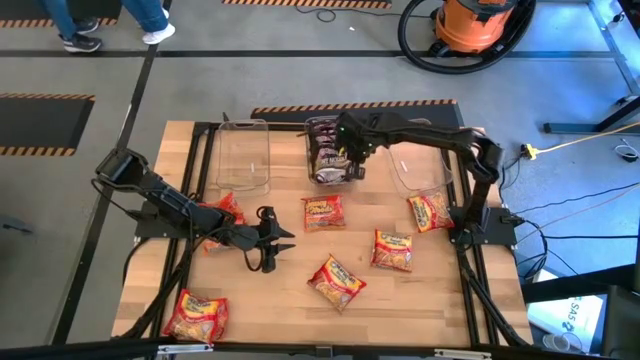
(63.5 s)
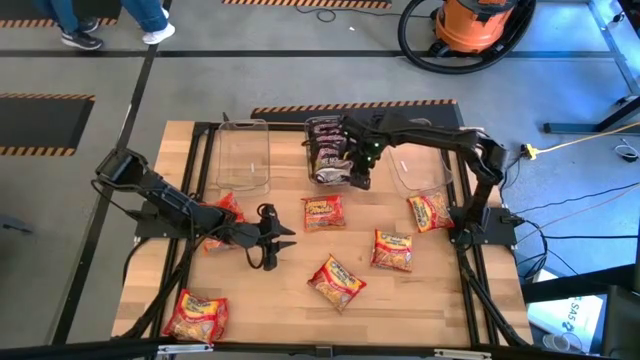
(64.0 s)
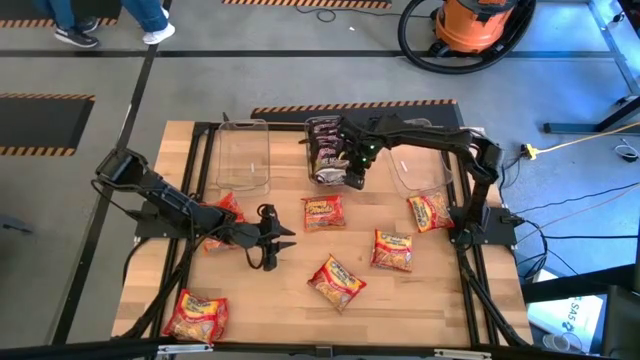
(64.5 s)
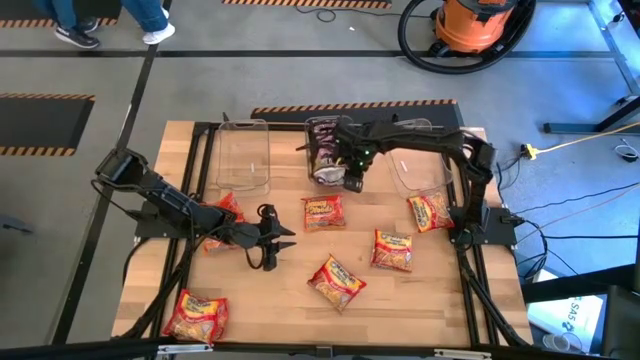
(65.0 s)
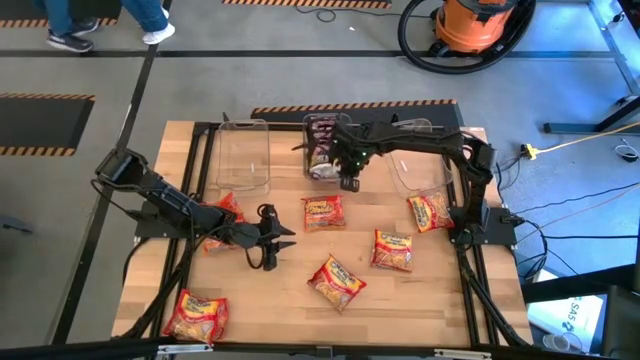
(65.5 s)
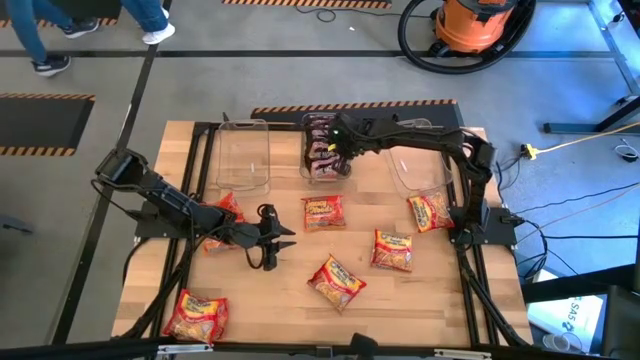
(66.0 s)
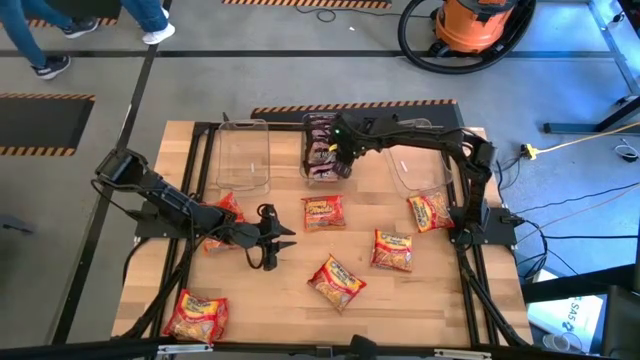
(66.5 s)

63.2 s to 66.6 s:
Task: Sort Maruchan noodles
Put the black noodle pack into the middle transparent bin

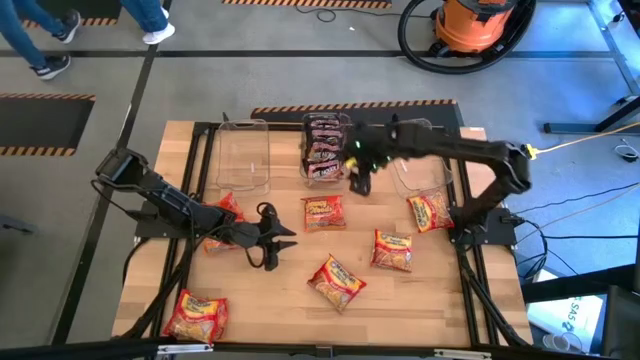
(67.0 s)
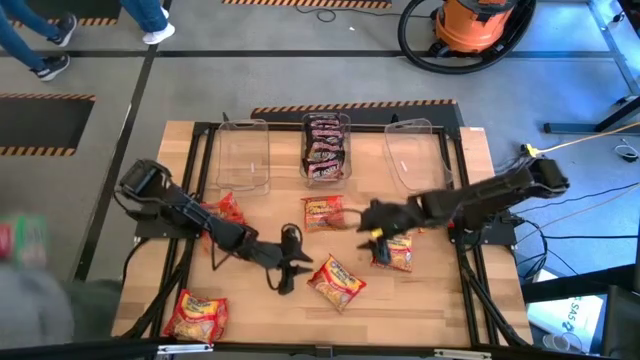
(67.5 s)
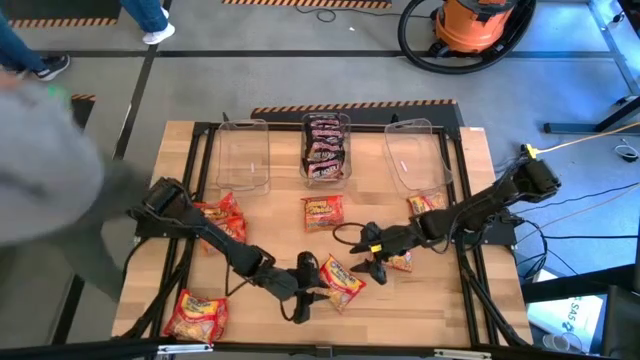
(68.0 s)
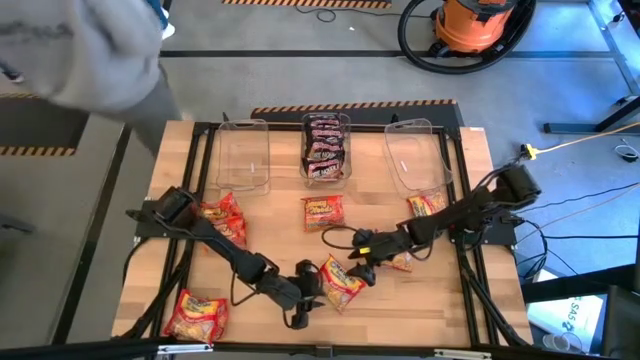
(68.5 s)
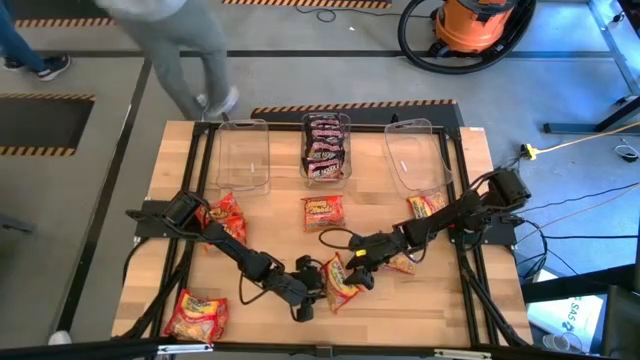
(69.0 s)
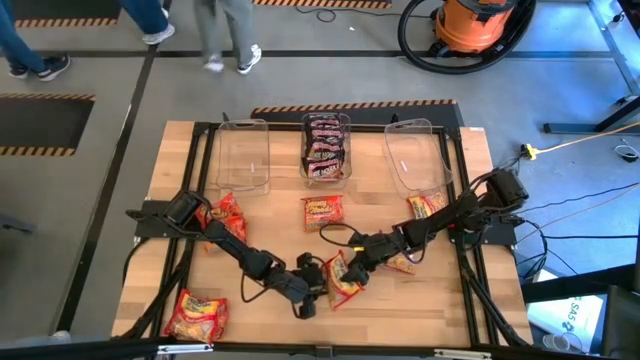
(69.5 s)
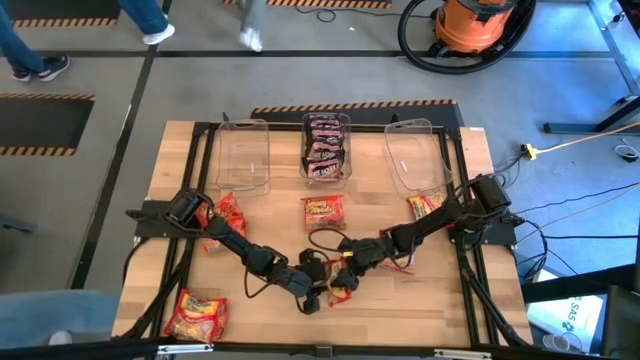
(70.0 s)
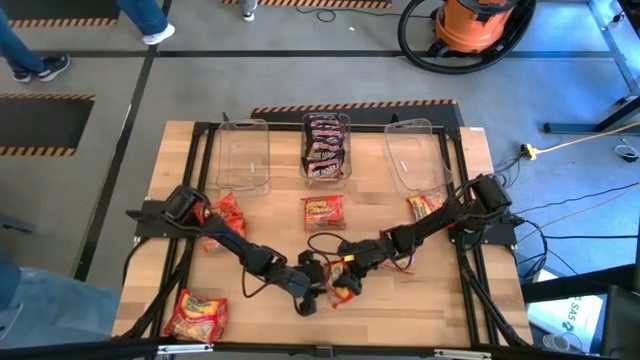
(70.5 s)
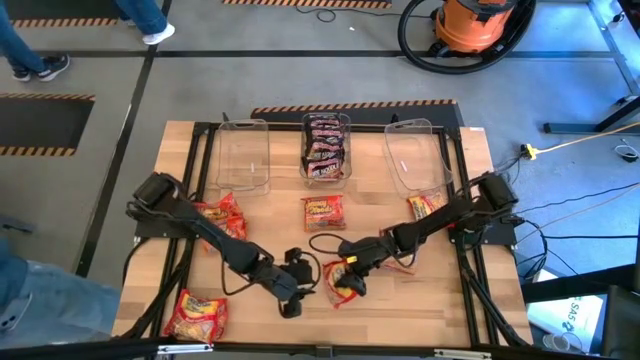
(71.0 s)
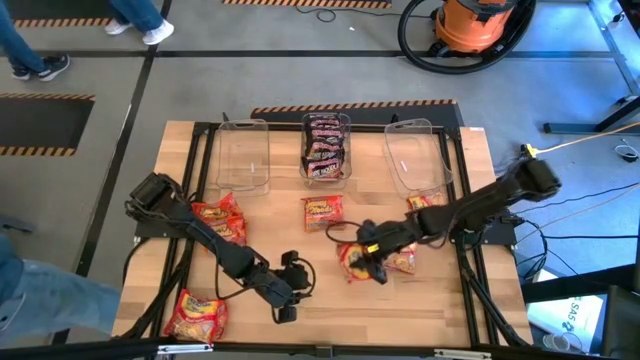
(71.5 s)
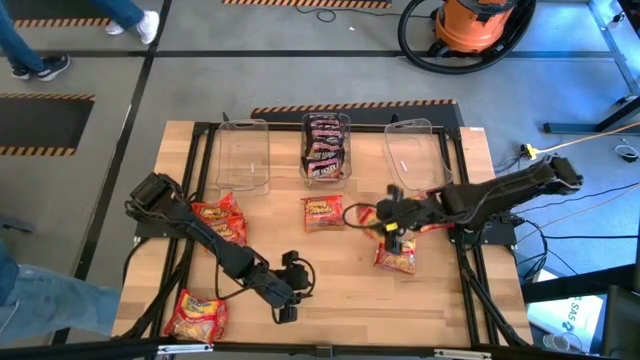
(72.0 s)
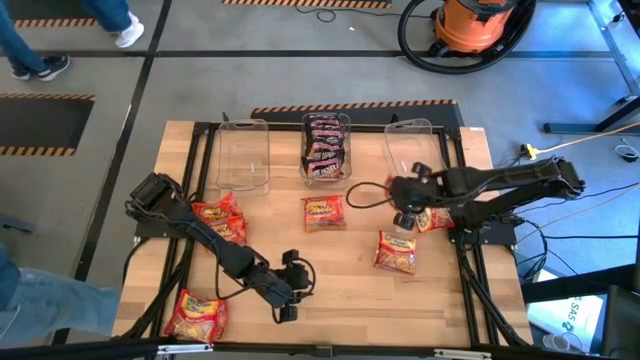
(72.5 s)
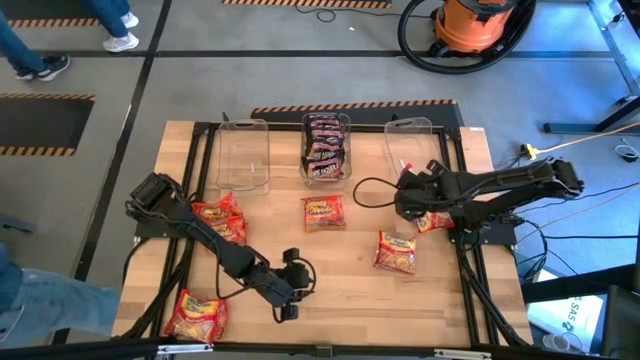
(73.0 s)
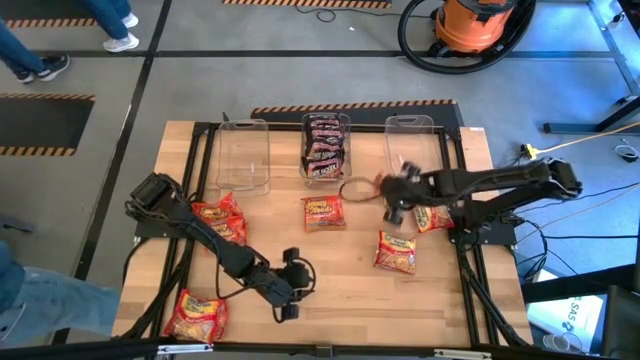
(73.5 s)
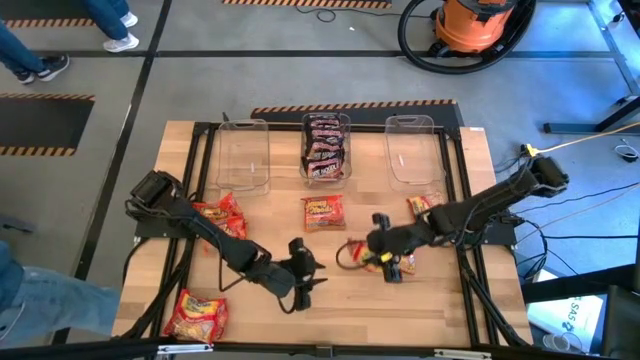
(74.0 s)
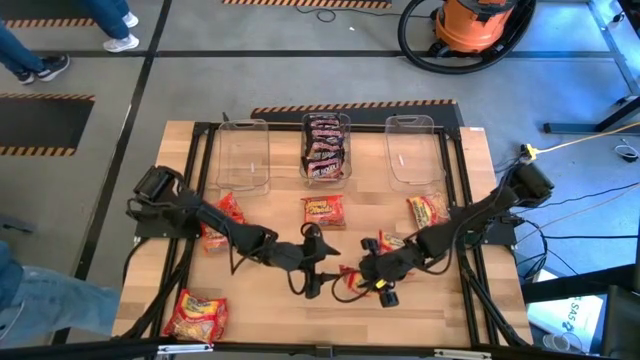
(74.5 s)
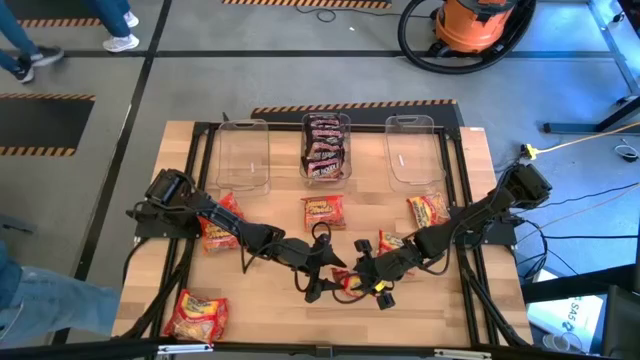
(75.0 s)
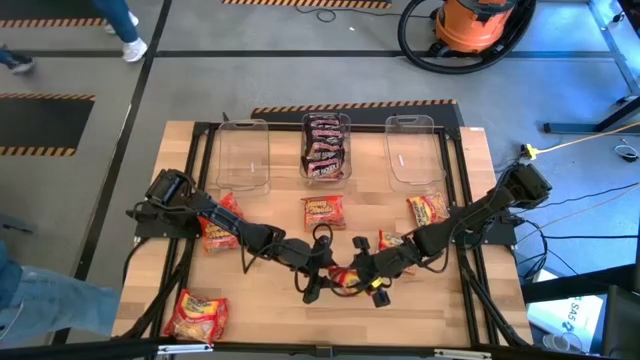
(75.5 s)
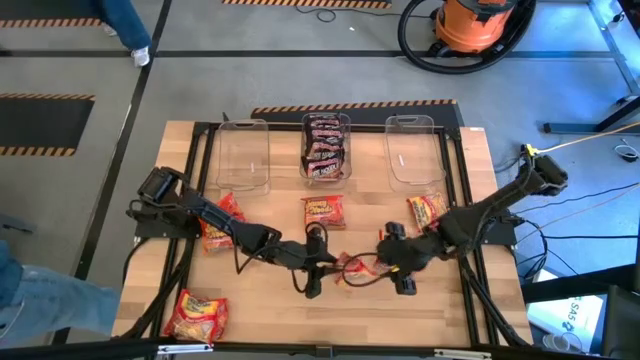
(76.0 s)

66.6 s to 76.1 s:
Put the red noodle pack into the right transparent bin

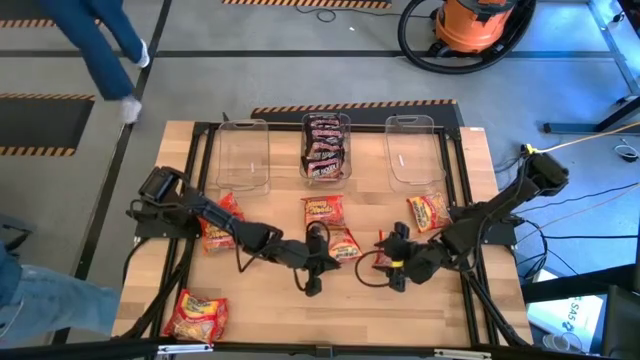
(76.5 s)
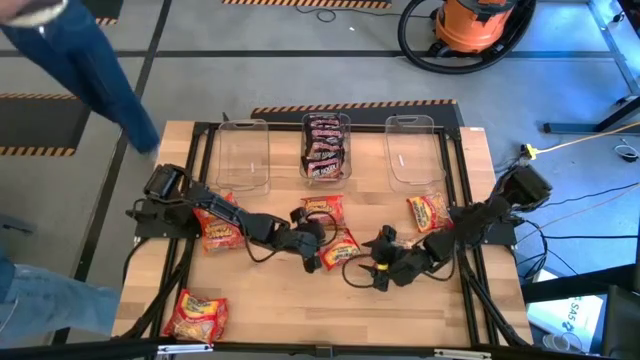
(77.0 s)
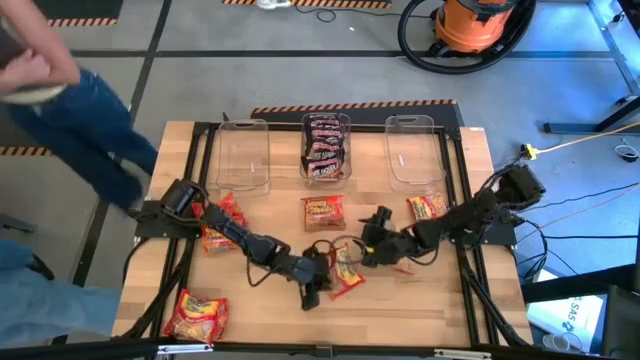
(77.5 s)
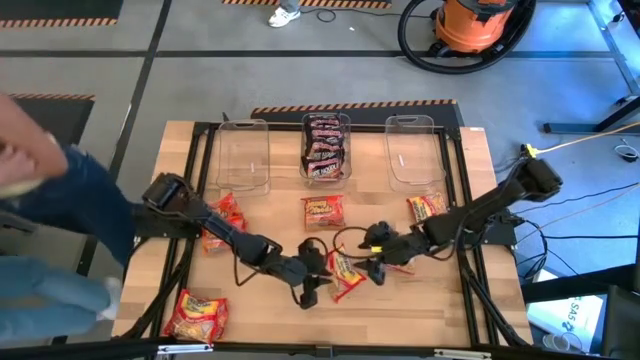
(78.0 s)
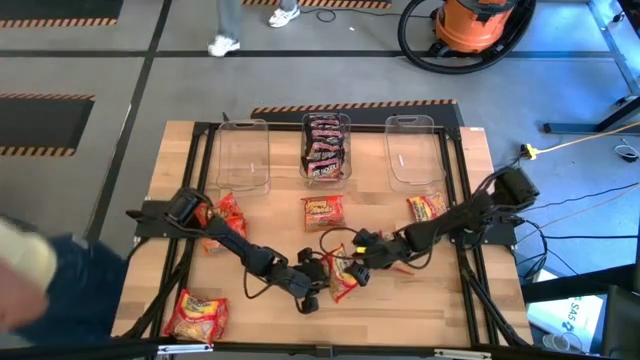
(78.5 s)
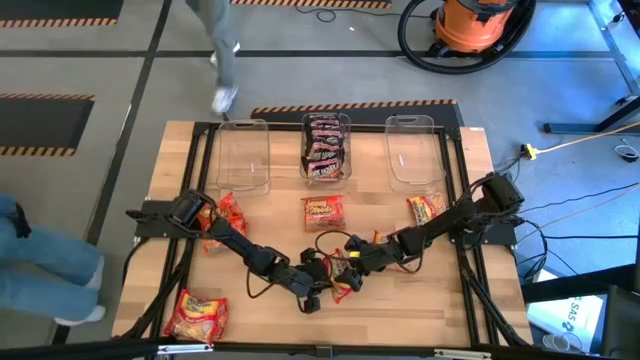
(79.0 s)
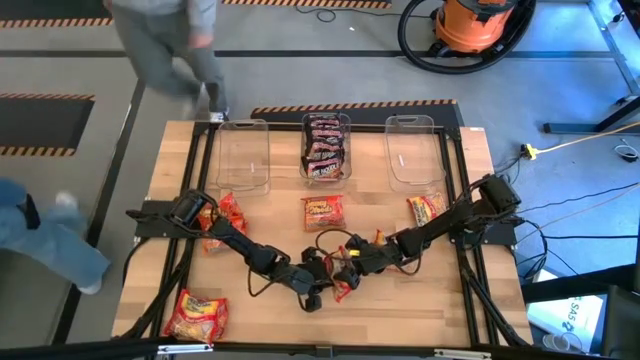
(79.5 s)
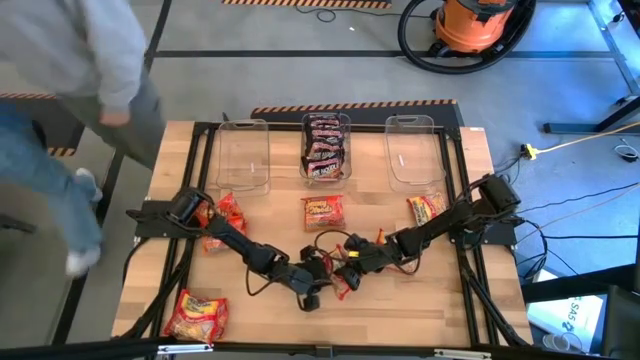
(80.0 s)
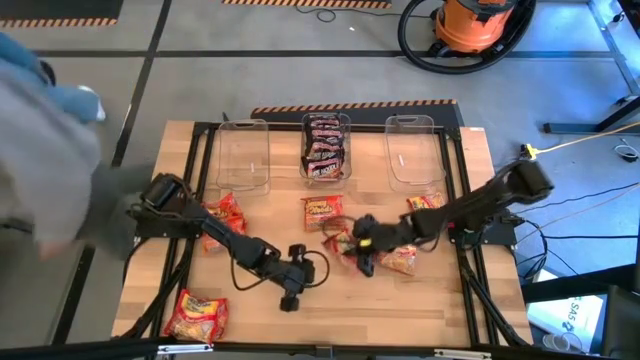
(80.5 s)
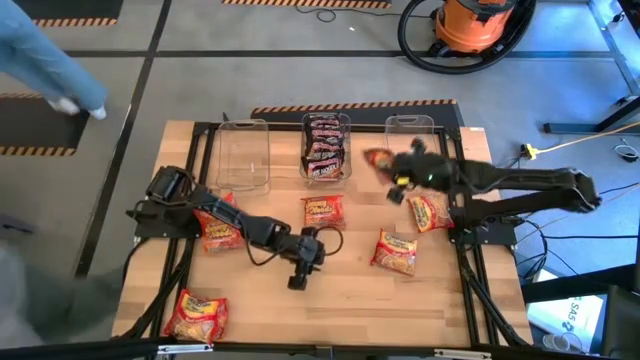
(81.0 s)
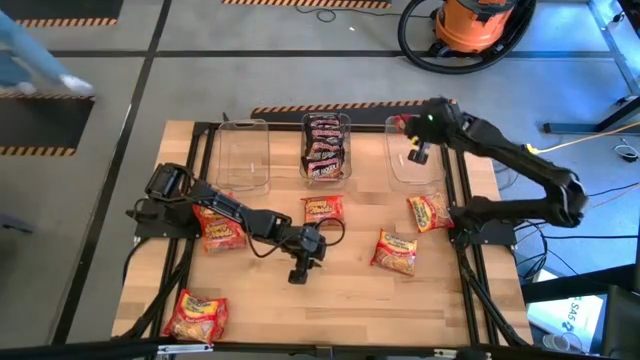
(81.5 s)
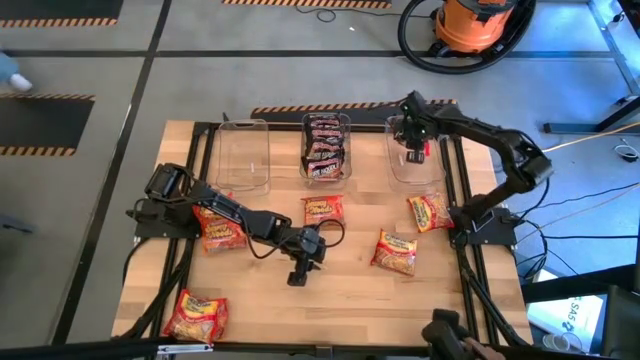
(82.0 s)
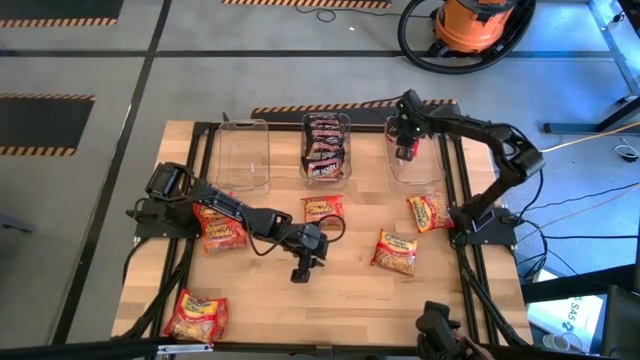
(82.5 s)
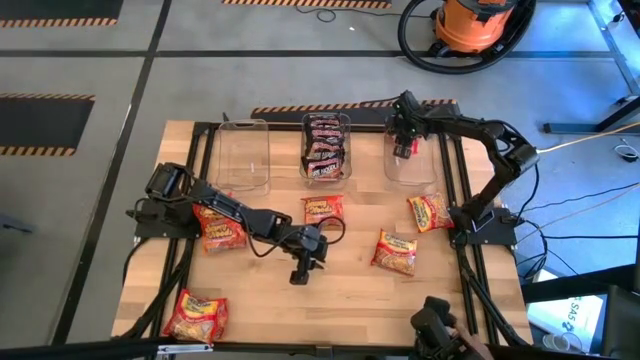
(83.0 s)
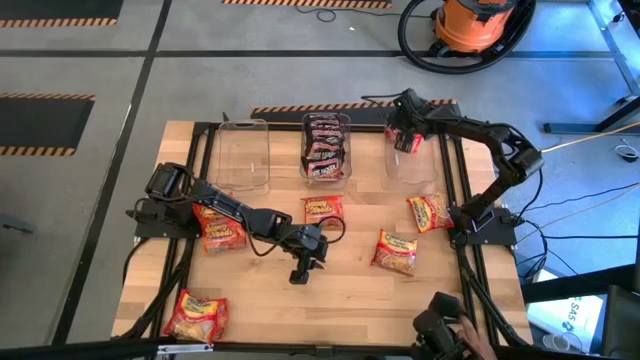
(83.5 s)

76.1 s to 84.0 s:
Put the red noodle pack into the right transparent bin
